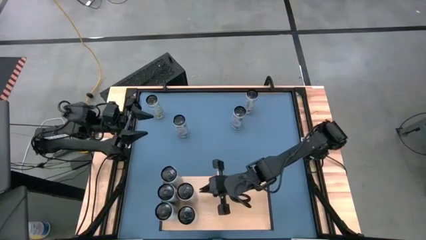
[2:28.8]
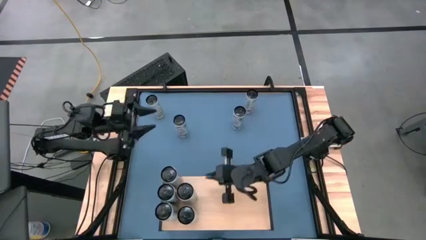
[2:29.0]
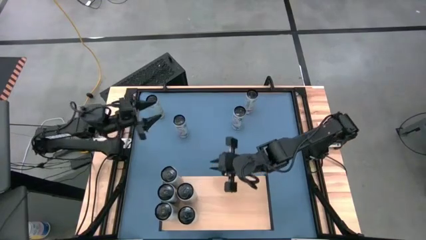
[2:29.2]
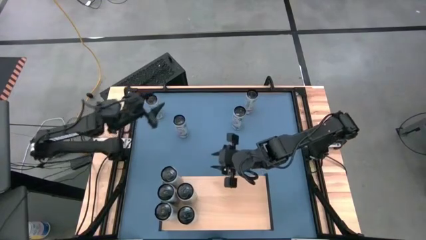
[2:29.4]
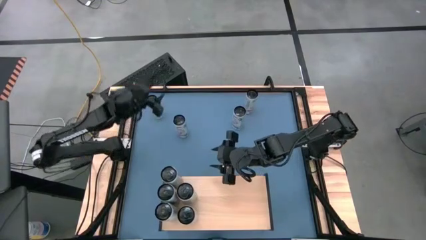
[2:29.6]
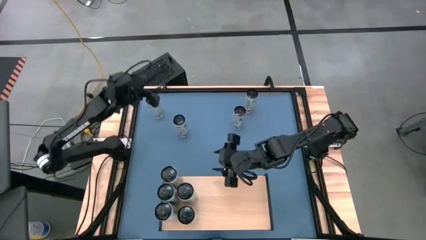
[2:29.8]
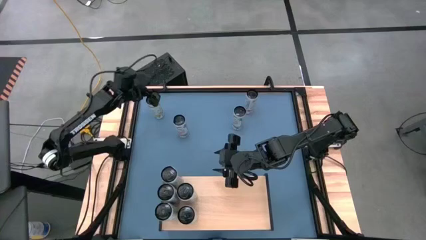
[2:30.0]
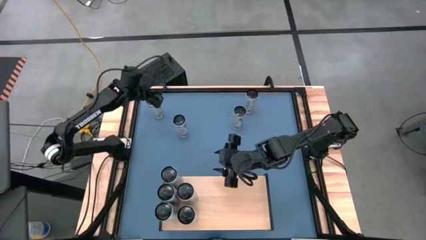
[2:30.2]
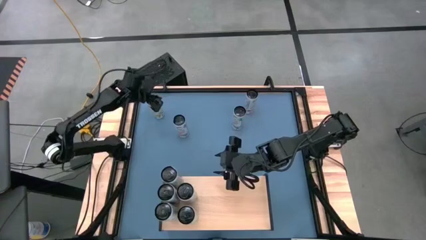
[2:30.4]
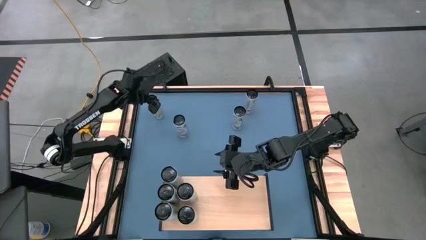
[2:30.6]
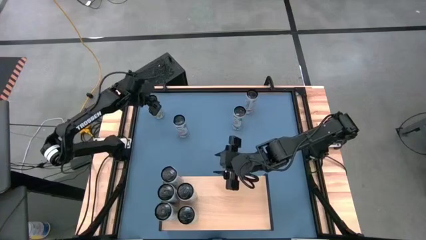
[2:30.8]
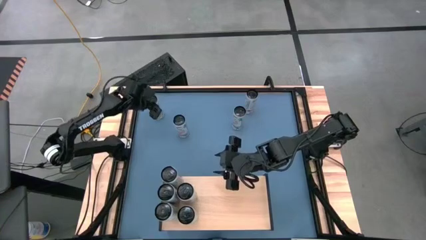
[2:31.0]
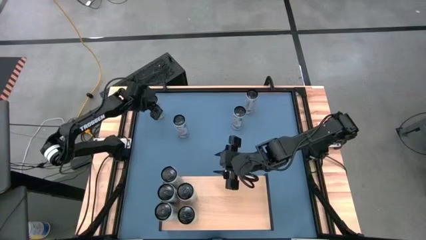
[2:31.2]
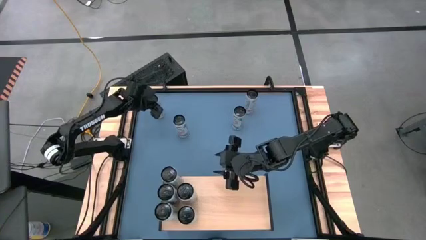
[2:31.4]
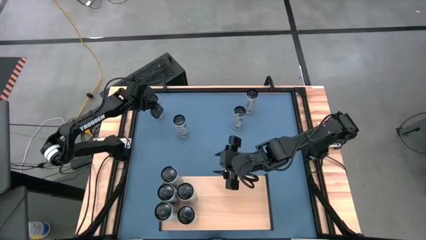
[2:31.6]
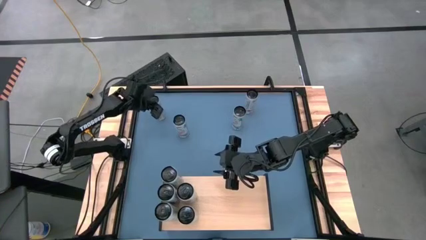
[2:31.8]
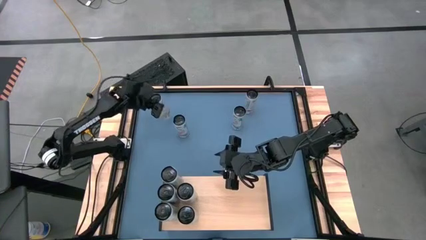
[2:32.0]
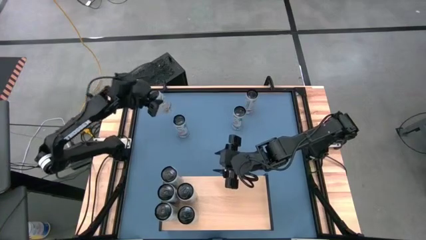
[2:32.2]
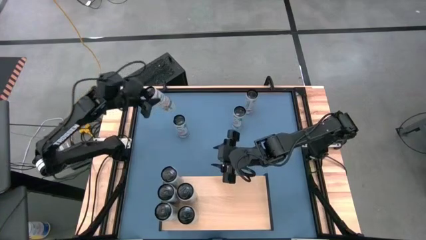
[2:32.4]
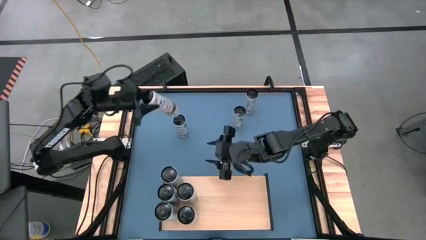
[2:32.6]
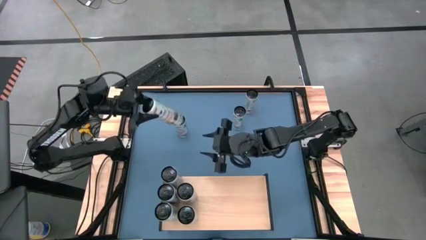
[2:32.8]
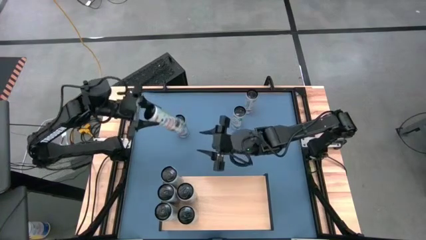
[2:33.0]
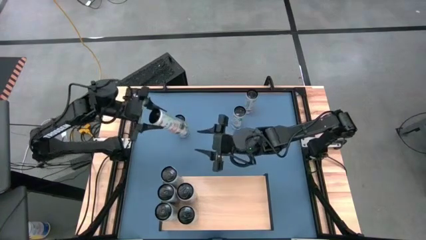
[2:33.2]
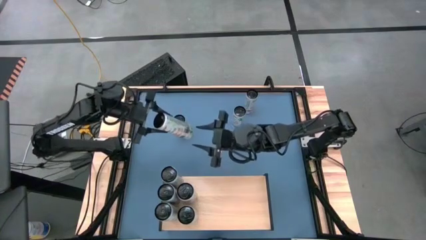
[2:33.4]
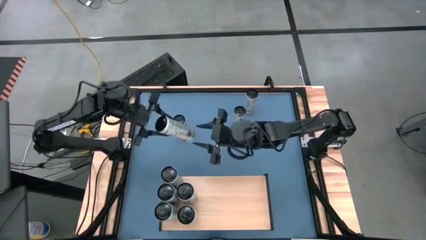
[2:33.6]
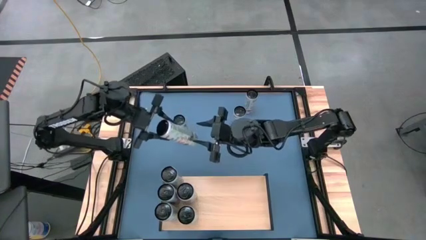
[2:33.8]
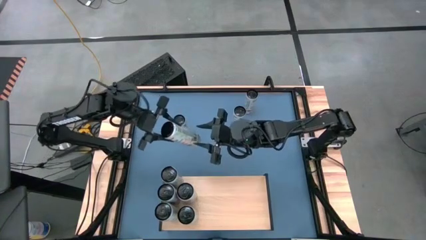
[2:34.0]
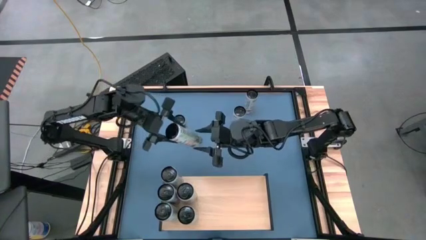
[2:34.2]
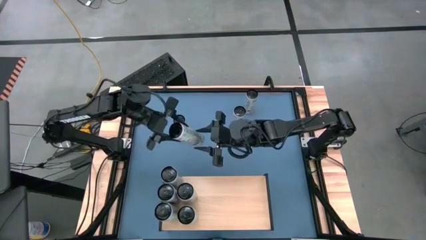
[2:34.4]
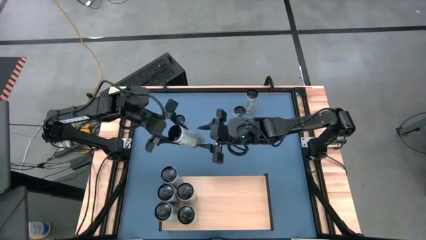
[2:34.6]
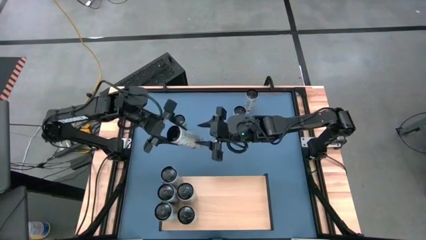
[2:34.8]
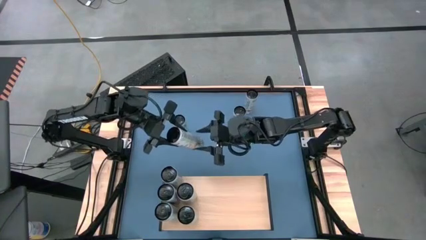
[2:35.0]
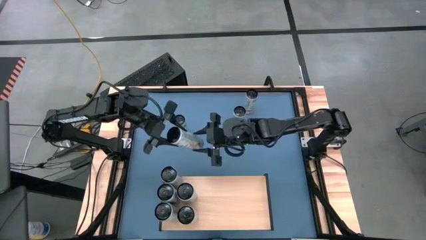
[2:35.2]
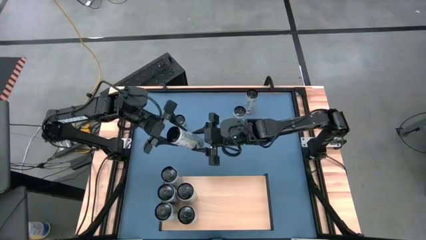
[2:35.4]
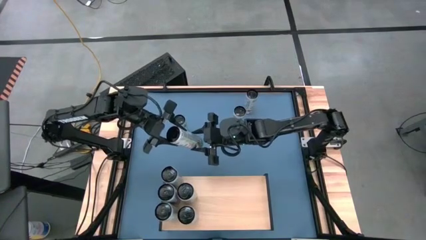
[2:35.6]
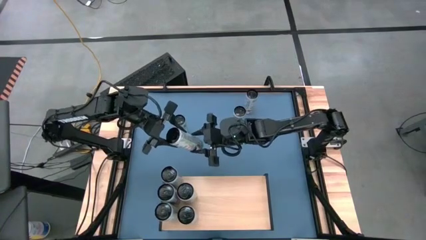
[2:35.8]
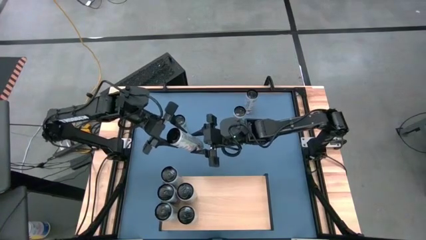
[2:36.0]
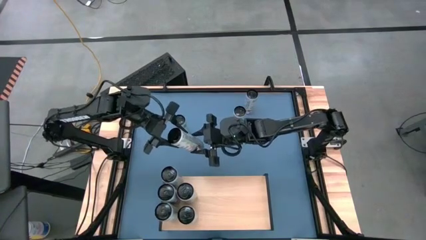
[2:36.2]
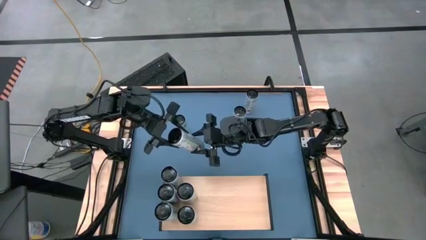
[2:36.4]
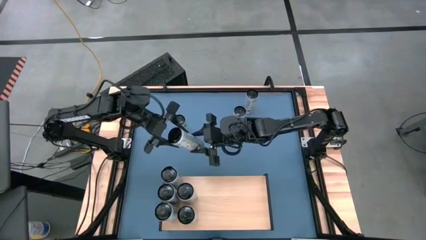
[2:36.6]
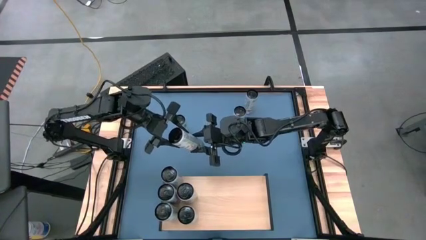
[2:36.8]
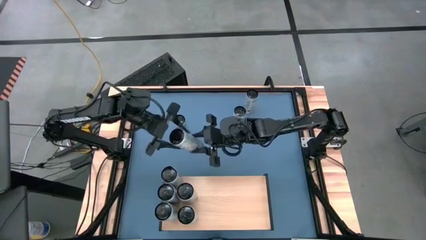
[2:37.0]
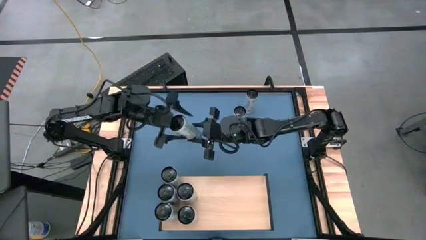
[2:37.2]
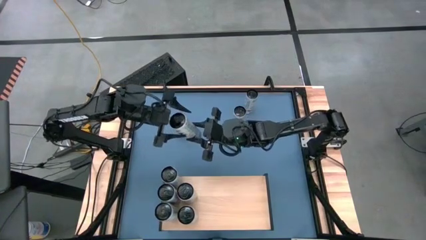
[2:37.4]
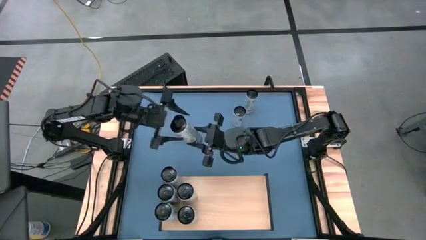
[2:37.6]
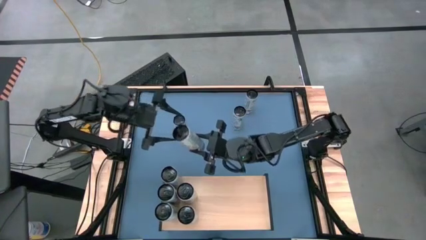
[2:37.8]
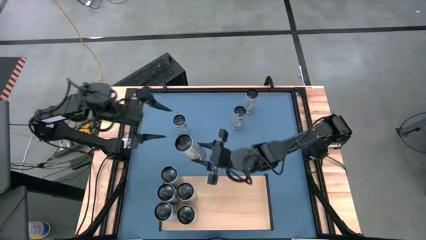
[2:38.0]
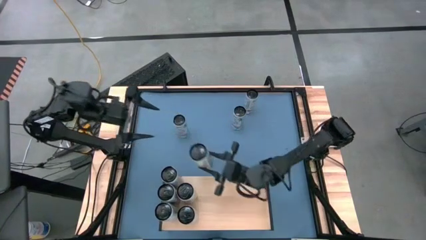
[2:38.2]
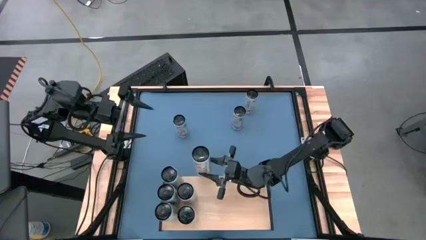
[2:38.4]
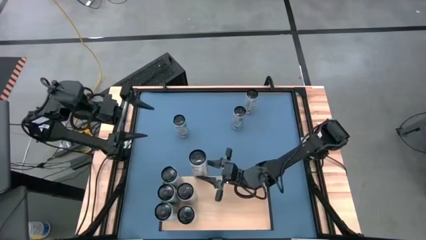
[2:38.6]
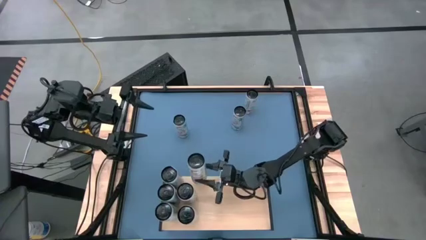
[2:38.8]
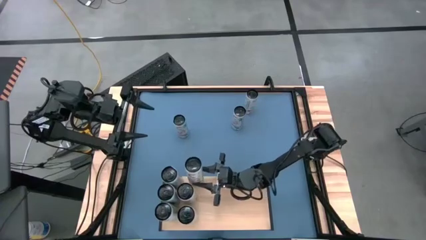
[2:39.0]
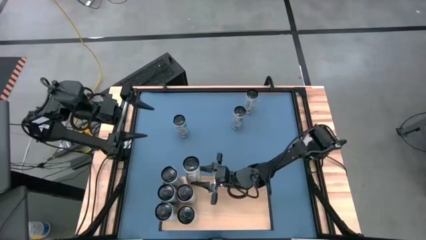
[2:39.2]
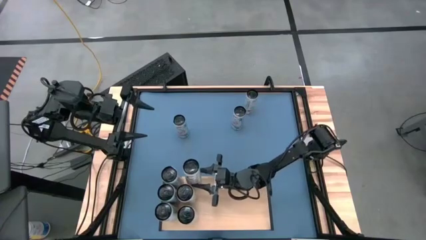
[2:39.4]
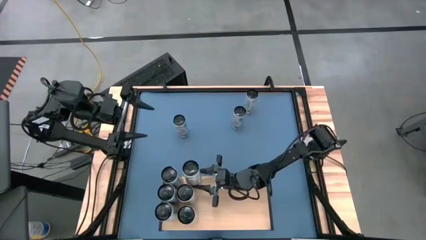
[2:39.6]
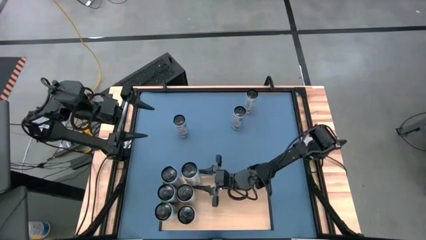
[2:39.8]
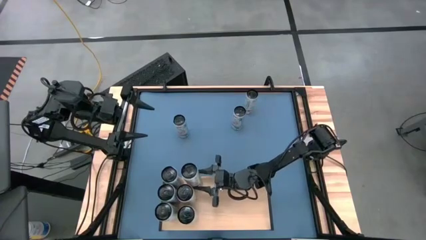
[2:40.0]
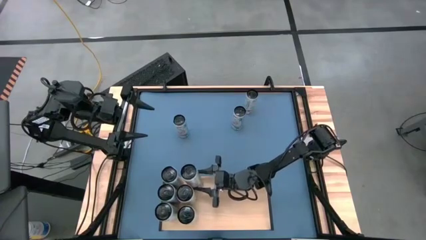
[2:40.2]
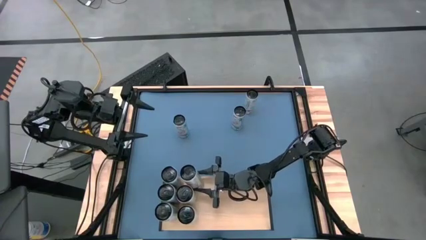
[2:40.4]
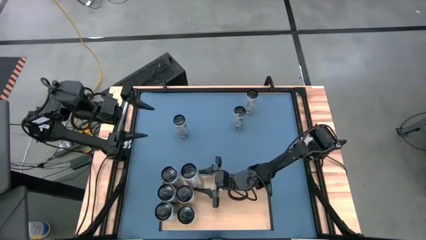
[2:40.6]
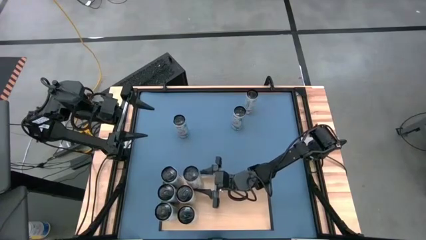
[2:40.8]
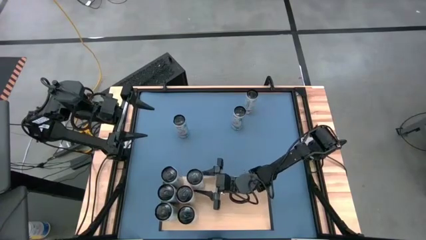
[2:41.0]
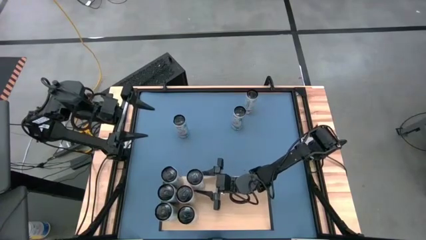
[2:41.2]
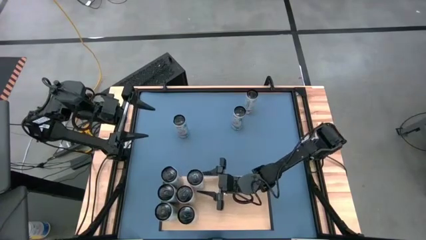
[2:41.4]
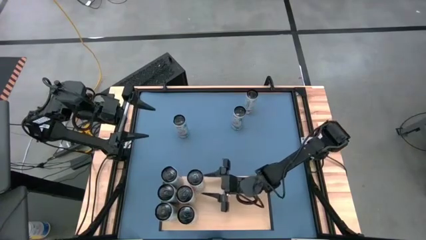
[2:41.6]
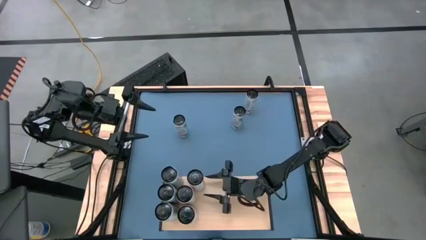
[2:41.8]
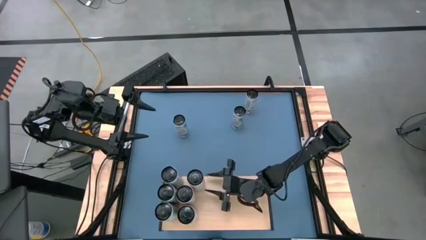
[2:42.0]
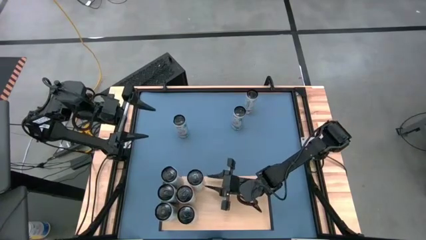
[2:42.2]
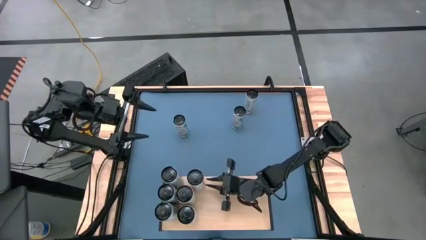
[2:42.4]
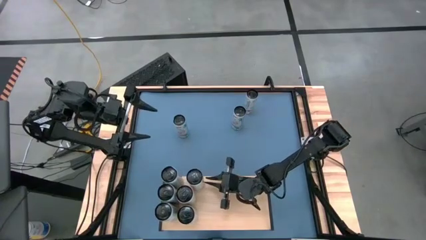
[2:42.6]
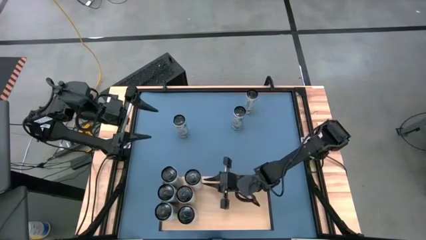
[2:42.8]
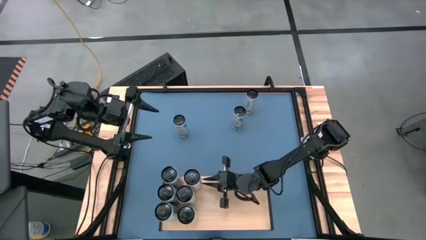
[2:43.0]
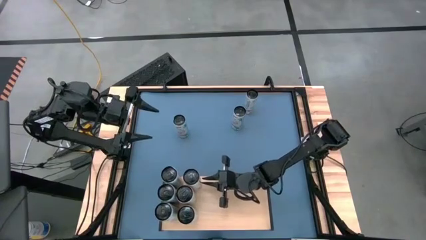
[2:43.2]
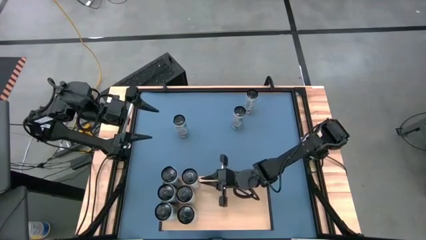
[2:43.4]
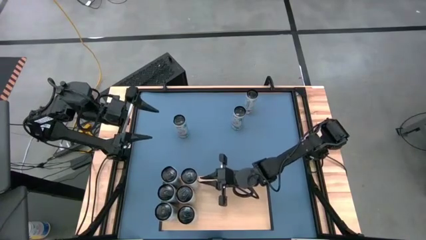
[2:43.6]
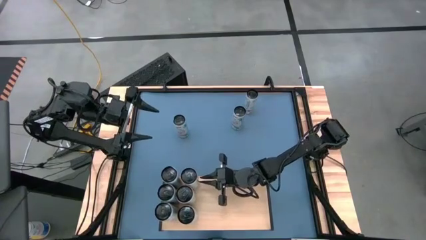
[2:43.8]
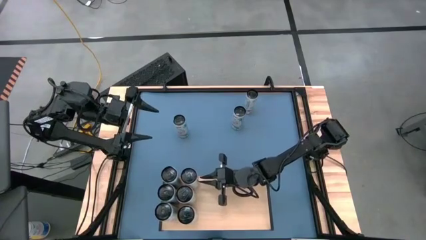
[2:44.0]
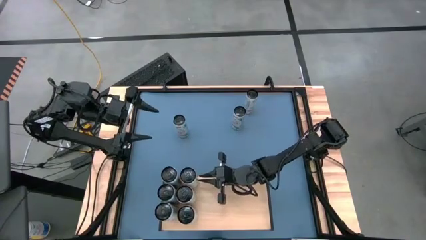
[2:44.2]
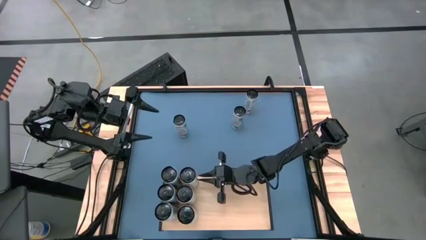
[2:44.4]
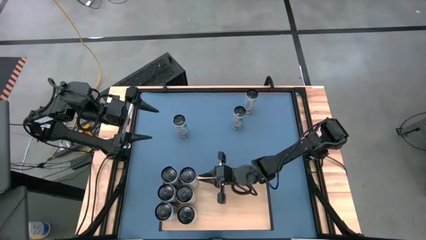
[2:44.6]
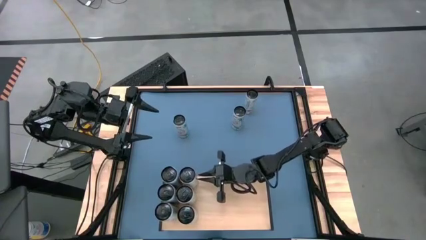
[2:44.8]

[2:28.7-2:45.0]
Task: Place canned beverage on shelf
Put the white yellow soda can on the shelf aligned with the other white yellow soda cans
